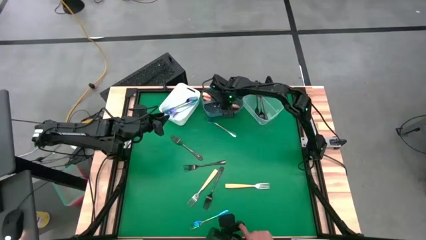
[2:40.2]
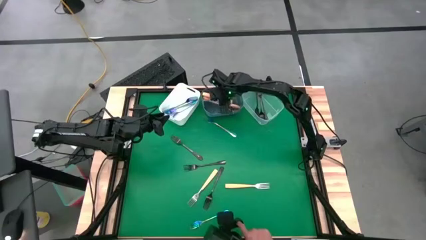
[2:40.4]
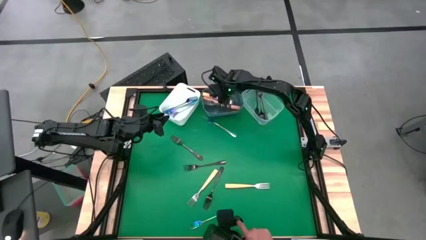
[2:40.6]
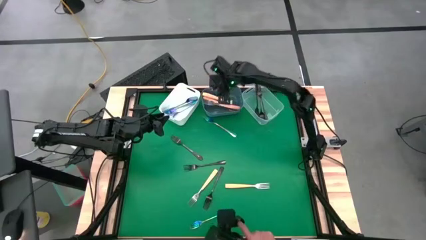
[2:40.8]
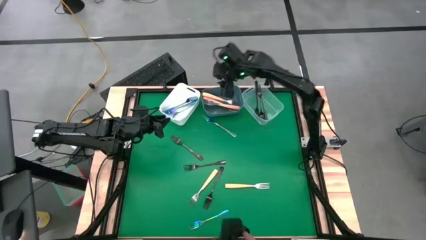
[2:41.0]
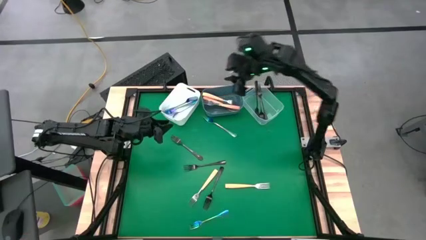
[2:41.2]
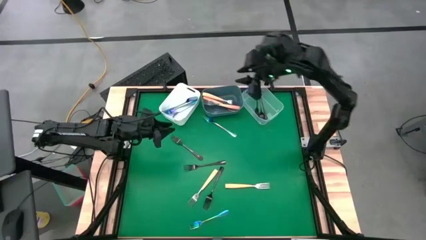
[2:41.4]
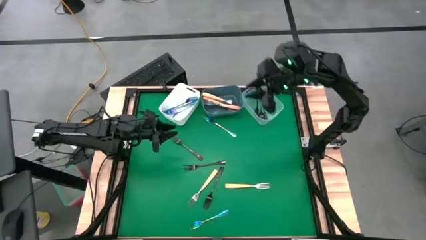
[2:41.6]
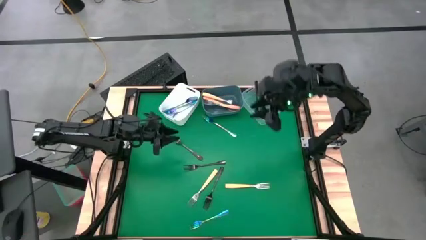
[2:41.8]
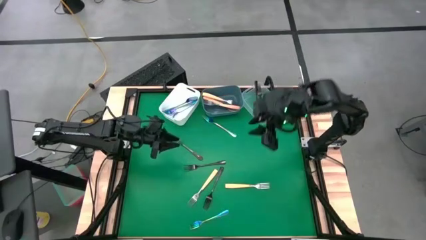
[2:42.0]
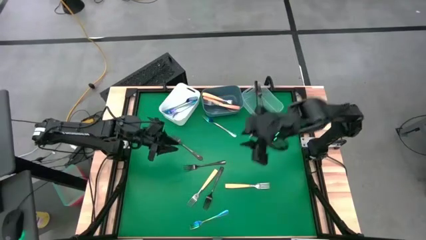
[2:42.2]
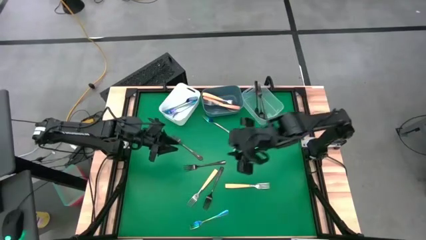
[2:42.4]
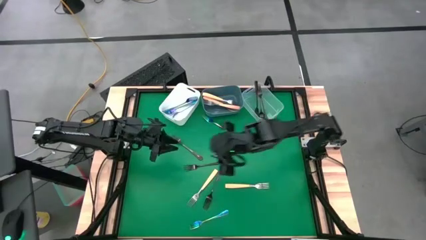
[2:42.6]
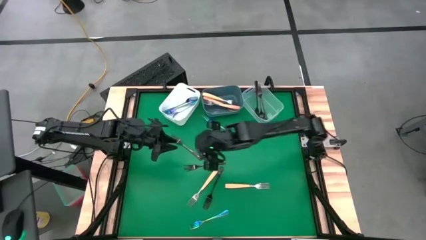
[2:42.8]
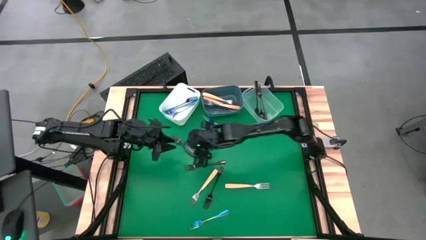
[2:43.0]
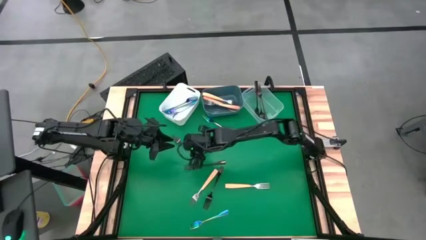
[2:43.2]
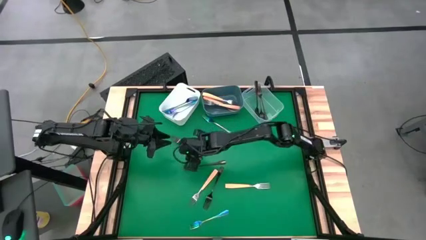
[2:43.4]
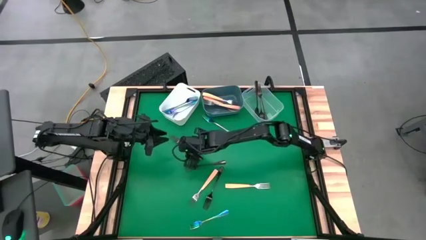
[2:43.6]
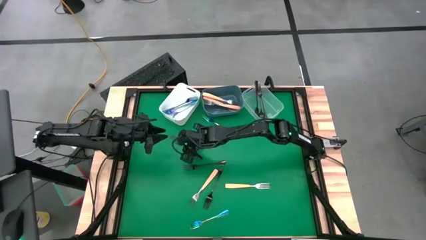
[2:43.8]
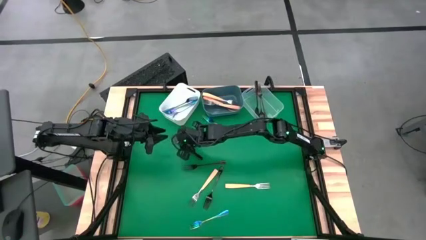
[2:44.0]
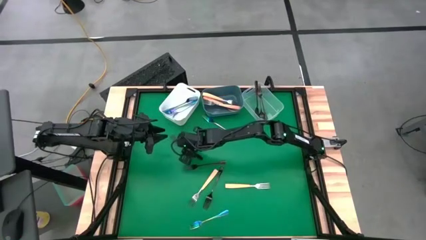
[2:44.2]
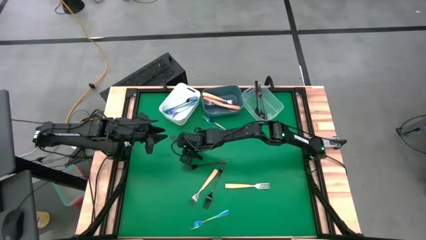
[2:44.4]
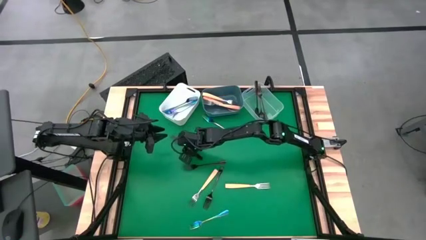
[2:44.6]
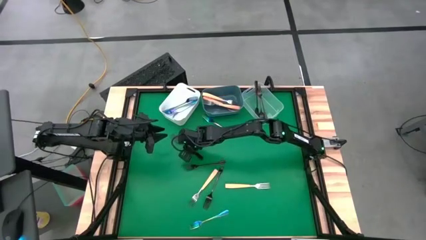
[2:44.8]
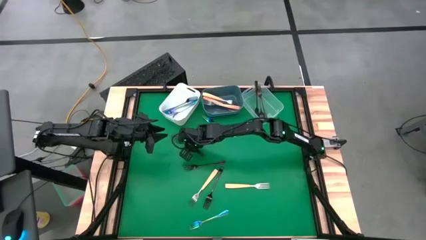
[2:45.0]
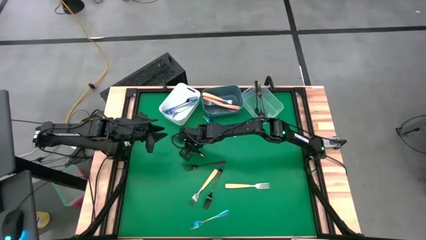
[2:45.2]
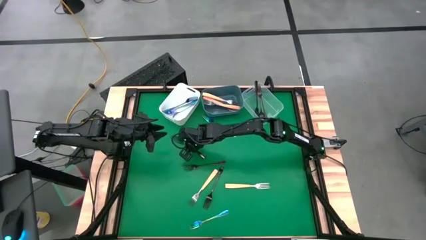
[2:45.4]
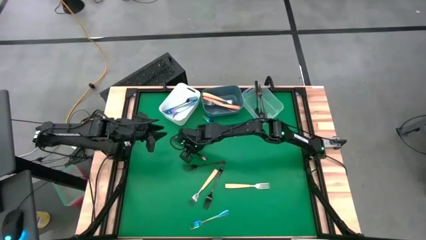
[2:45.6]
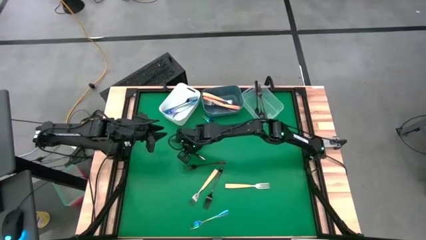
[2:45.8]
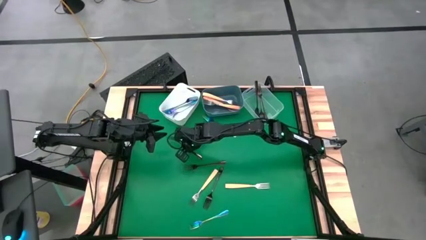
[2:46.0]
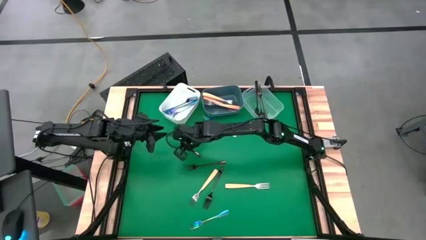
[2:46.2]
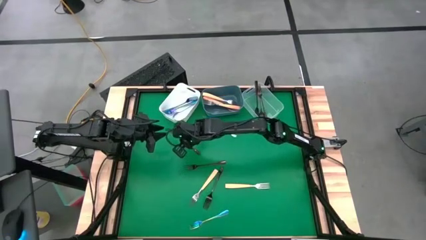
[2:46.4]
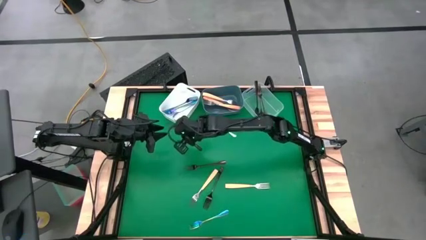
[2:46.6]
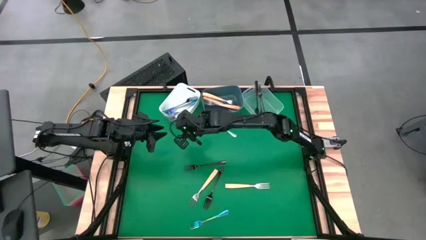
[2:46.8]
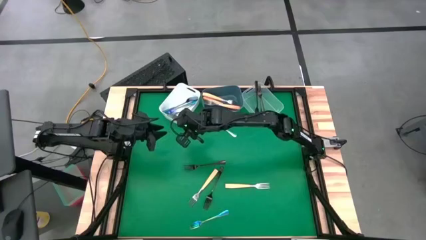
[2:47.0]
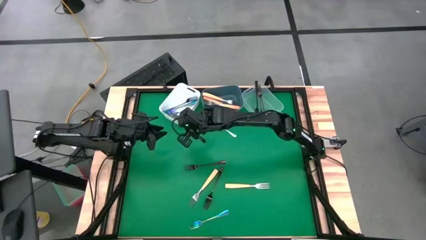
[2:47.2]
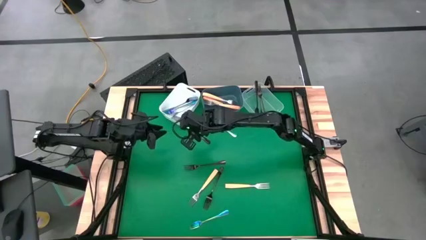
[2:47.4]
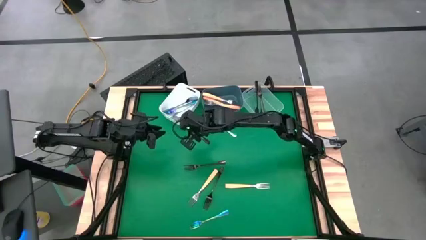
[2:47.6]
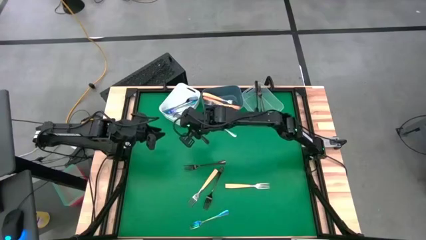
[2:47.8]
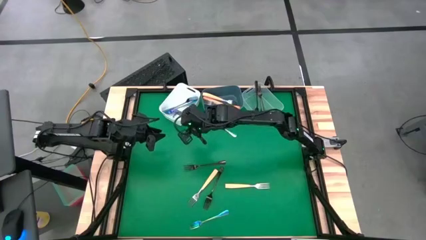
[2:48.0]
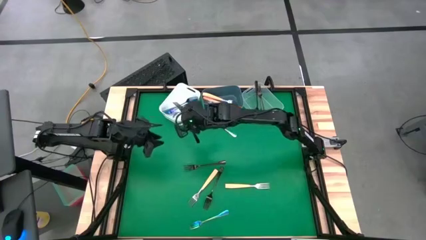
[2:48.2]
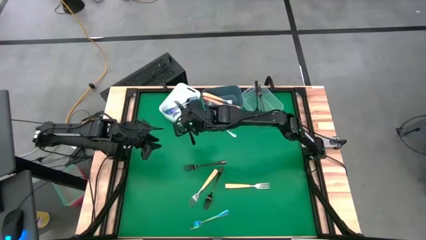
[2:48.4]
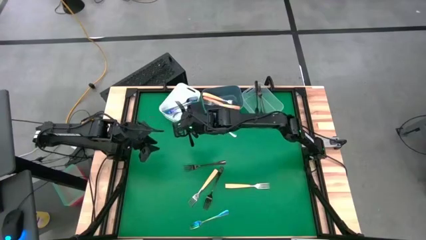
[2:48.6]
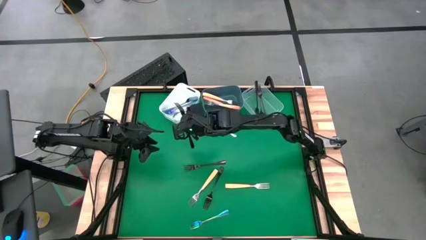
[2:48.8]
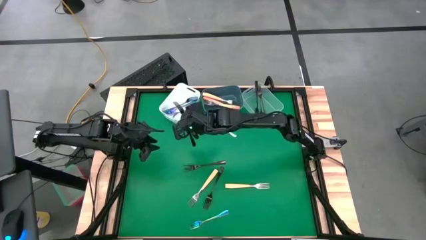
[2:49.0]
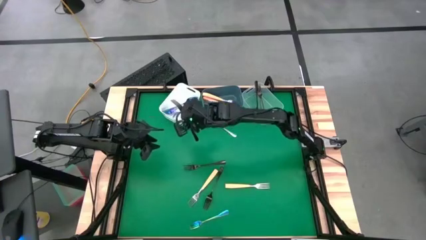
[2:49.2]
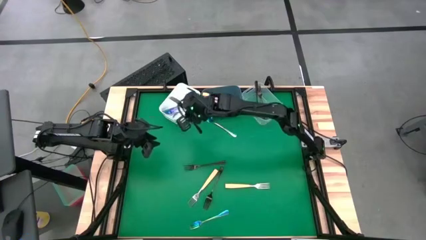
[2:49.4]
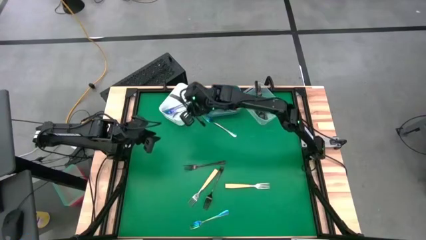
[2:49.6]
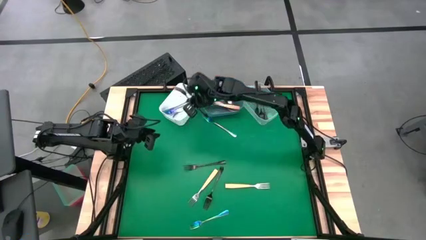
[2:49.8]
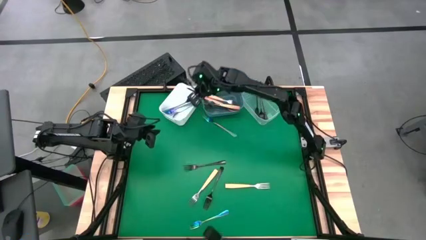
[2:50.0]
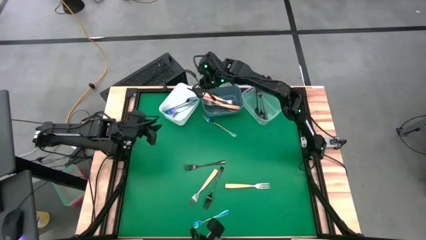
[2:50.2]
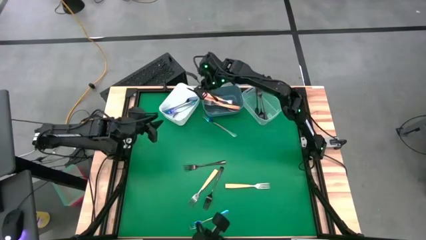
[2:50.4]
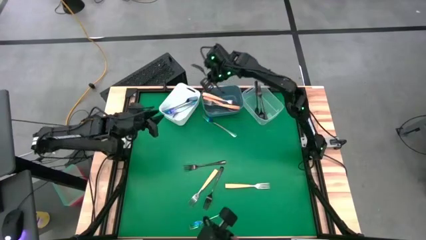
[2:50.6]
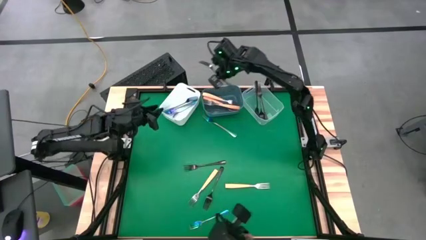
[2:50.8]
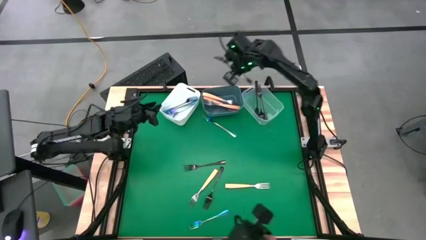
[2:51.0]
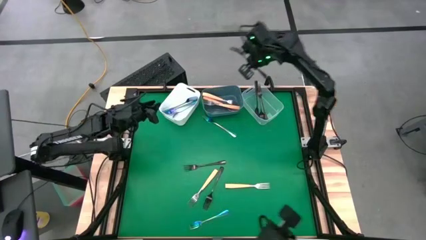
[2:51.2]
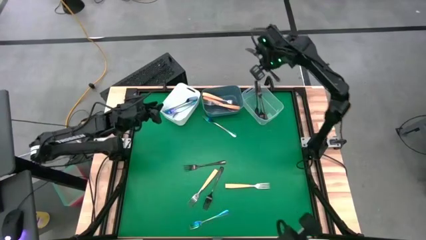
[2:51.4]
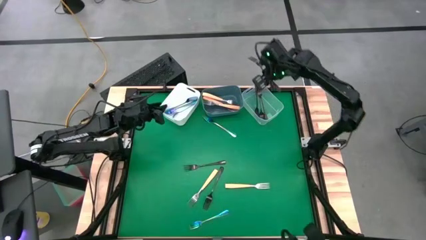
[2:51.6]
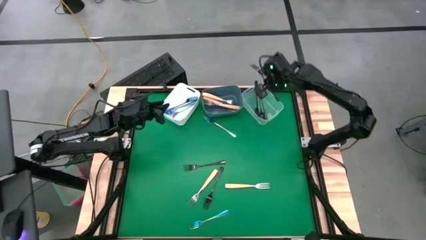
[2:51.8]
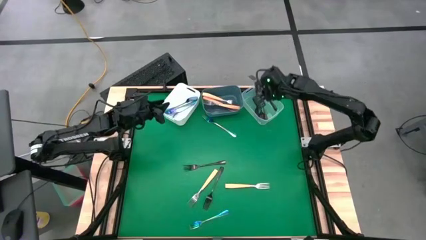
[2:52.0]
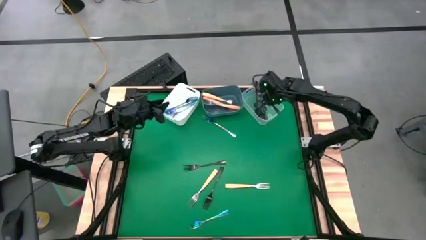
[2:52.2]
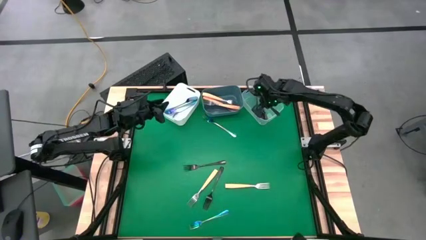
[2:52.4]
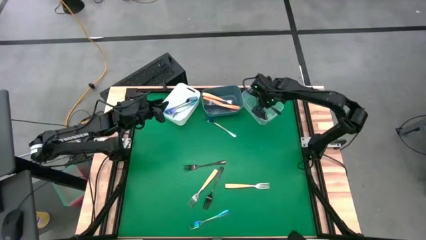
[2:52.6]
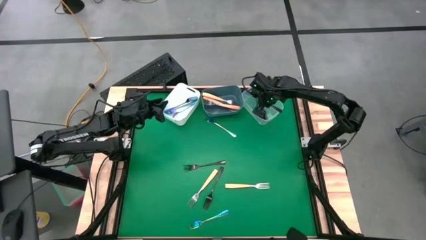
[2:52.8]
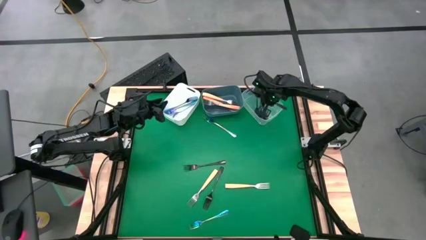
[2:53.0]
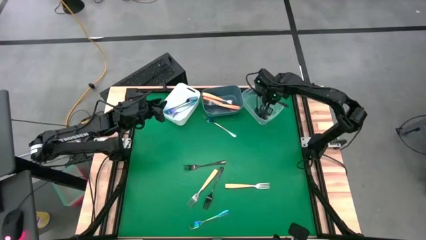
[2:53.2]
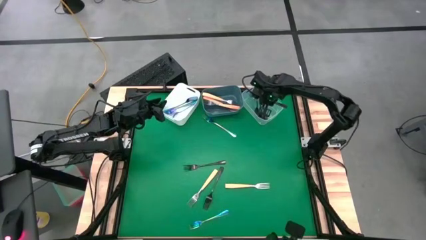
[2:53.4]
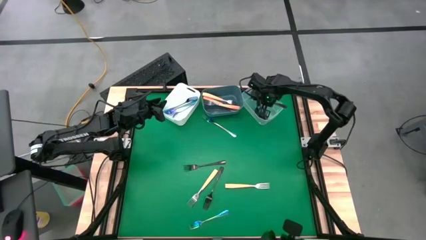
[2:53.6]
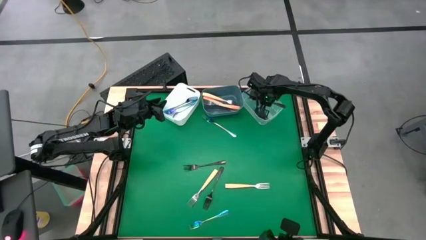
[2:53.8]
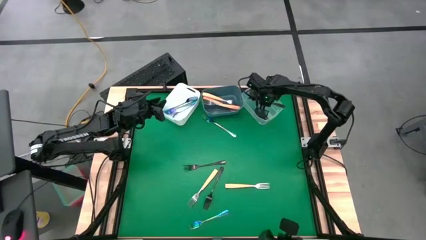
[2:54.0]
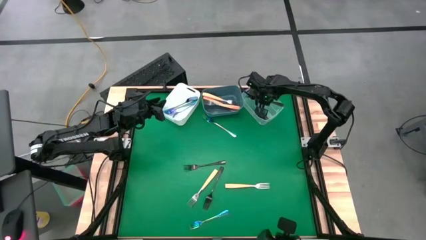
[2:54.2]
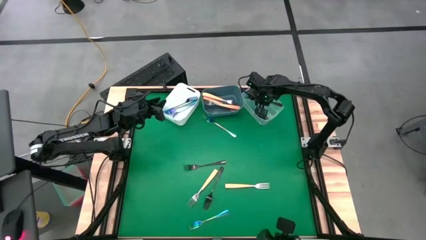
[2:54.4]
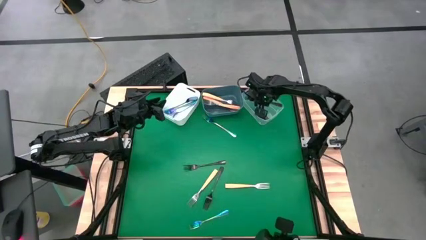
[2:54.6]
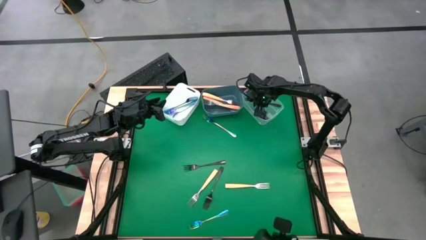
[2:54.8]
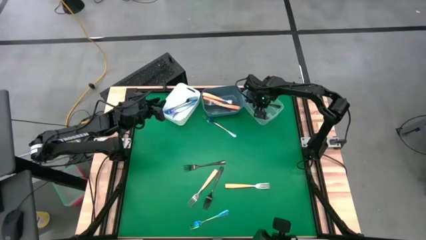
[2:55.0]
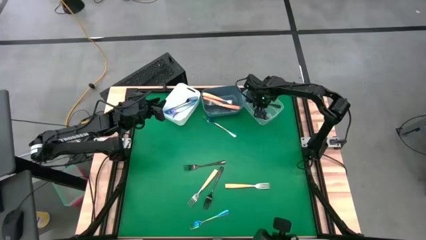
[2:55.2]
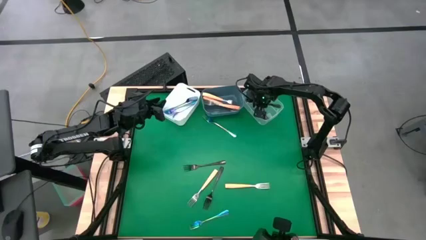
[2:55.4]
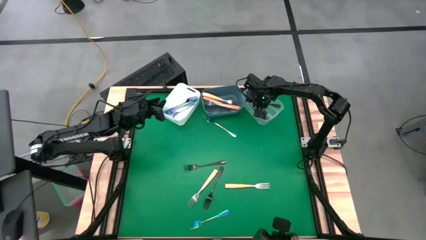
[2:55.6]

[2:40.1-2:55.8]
Task: Sort silverware by color (type)
Put the black fork into the transparent bin

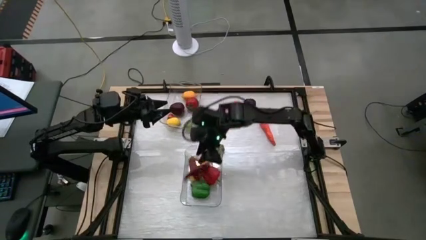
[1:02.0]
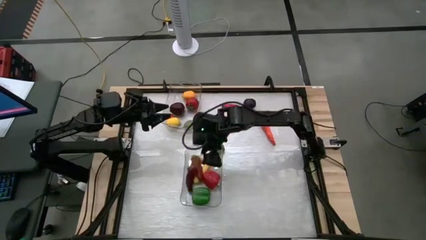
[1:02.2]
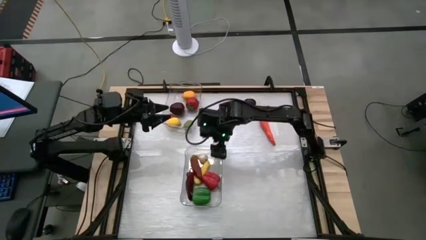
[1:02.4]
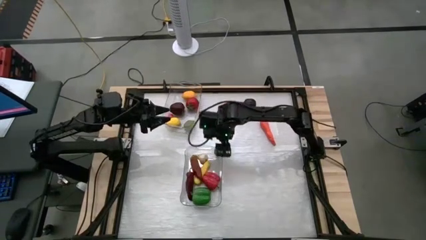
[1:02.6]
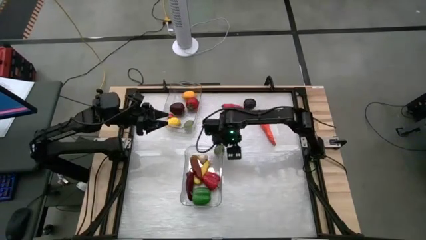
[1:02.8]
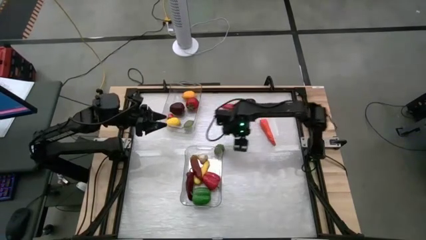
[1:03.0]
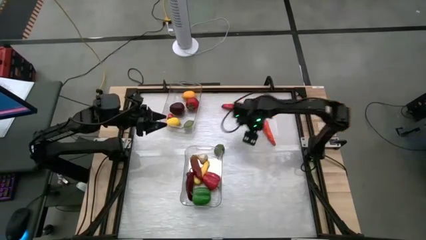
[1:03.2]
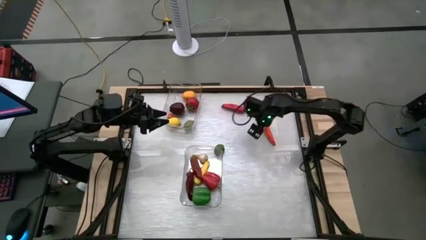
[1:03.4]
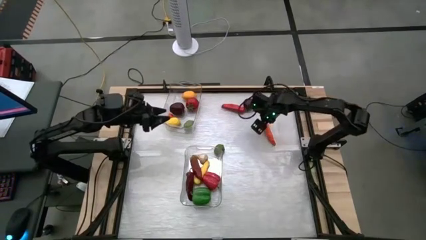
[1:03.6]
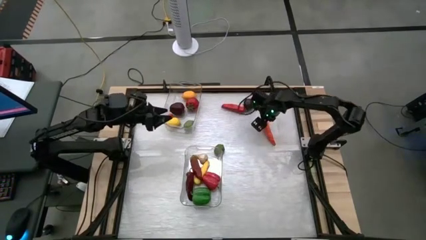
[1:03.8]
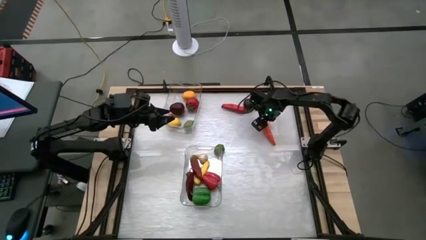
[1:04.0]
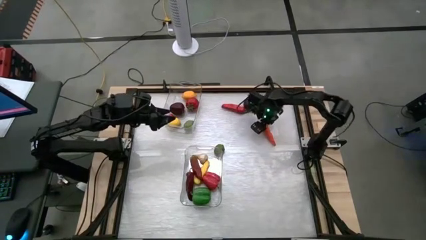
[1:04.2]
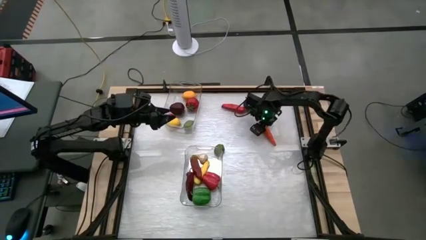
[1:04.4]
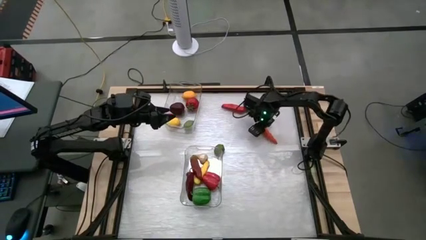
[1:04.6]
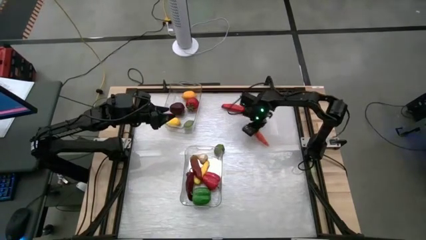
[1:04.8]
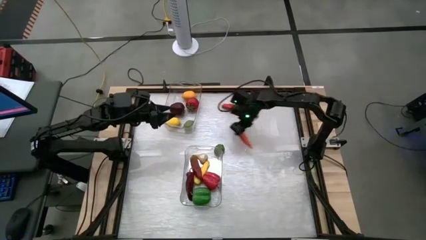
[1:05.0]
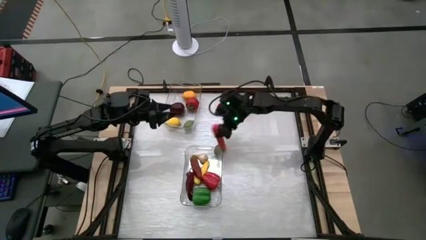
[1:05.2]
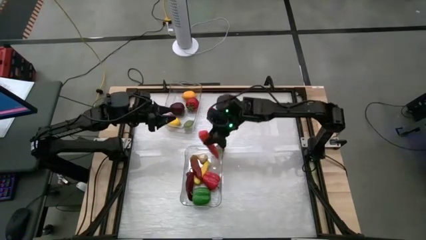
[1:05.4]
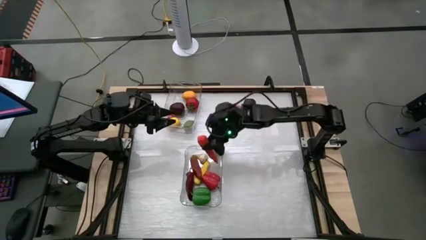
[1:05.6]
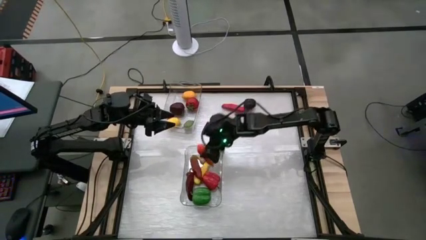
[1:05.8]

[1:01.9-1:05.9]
Task: Sort produce into baskets
Put the orange carrot into the bottom transparent bin
